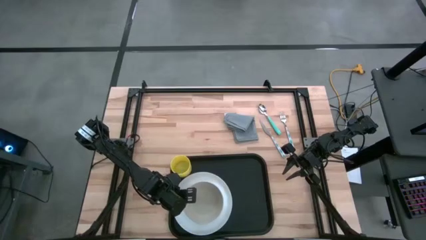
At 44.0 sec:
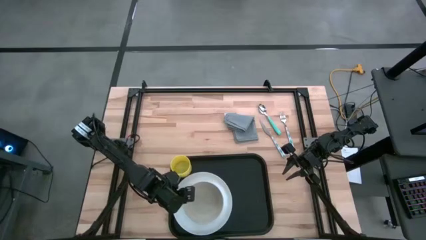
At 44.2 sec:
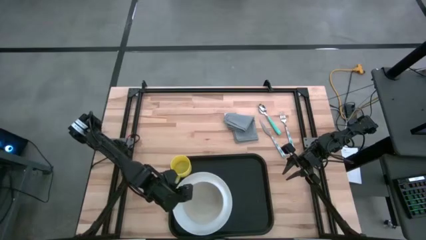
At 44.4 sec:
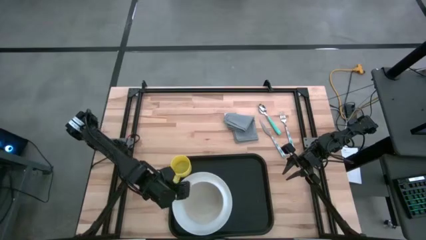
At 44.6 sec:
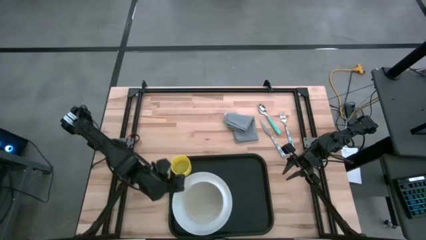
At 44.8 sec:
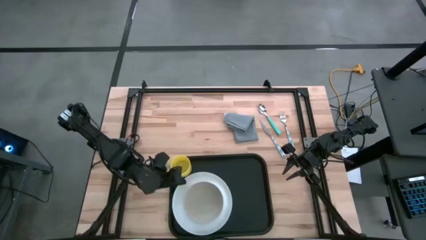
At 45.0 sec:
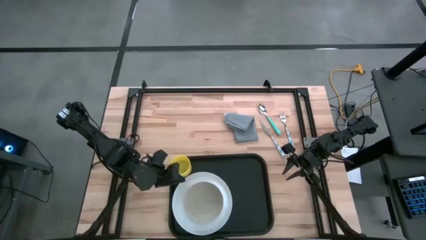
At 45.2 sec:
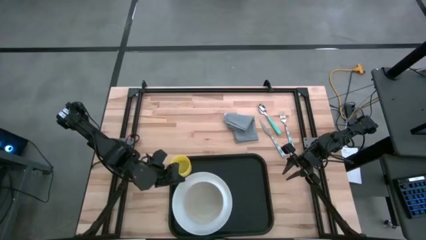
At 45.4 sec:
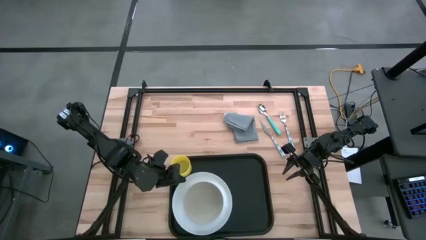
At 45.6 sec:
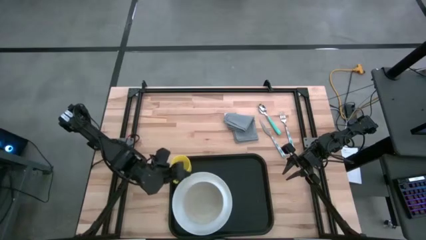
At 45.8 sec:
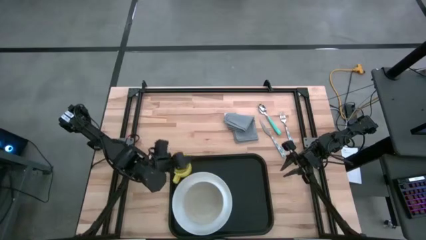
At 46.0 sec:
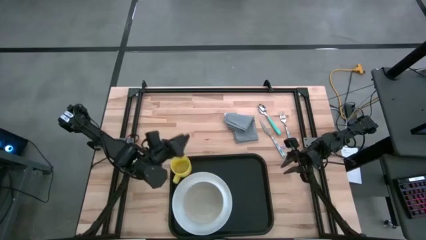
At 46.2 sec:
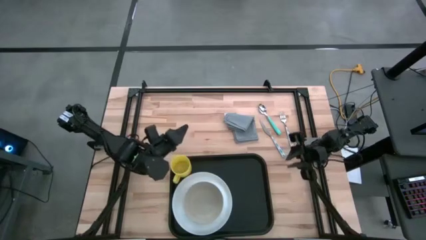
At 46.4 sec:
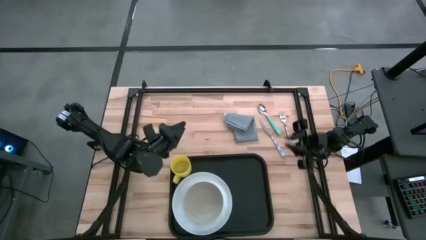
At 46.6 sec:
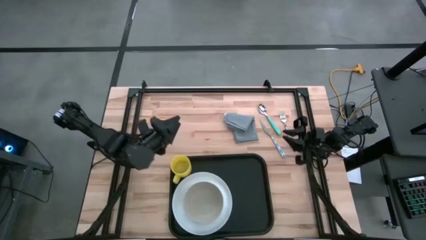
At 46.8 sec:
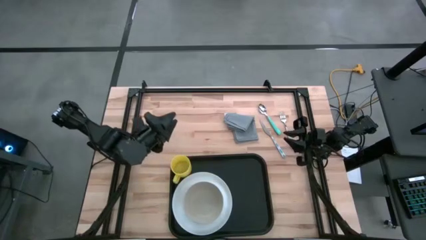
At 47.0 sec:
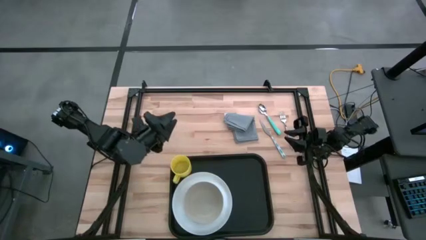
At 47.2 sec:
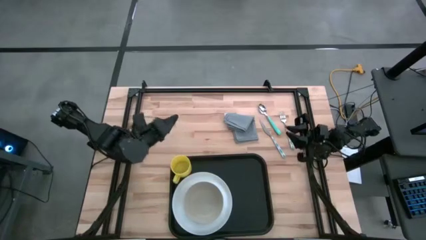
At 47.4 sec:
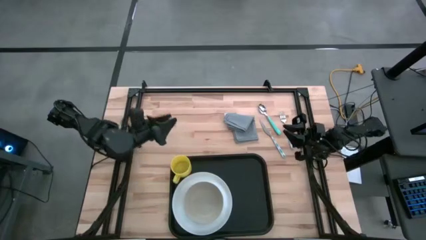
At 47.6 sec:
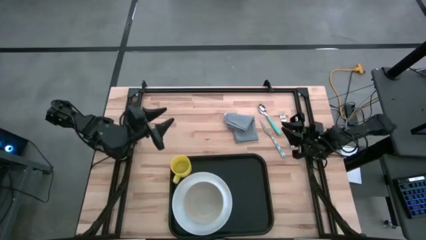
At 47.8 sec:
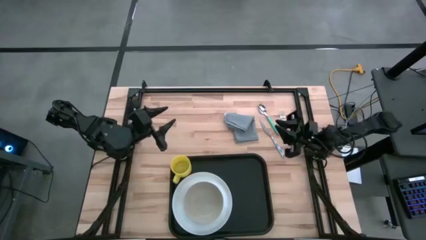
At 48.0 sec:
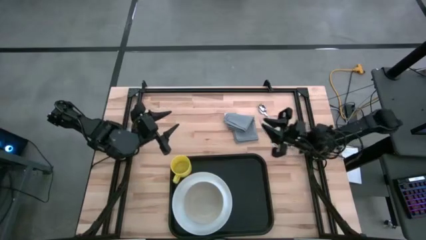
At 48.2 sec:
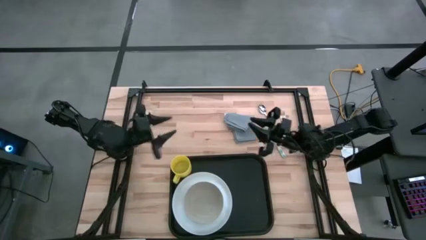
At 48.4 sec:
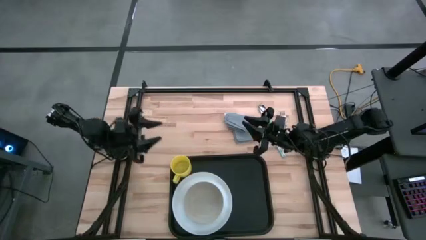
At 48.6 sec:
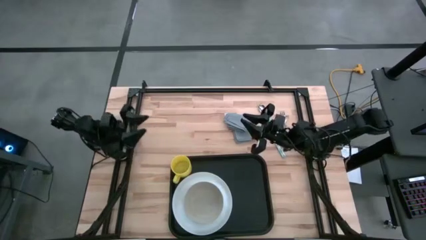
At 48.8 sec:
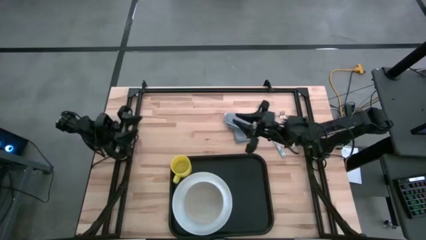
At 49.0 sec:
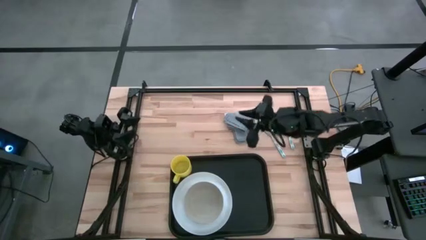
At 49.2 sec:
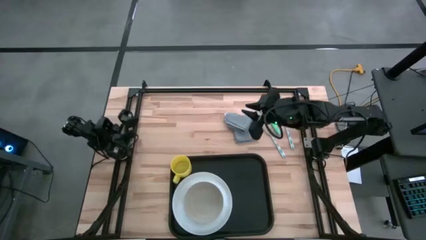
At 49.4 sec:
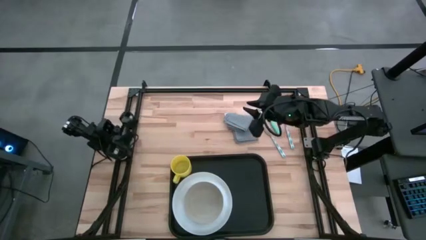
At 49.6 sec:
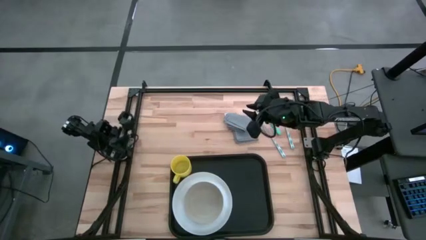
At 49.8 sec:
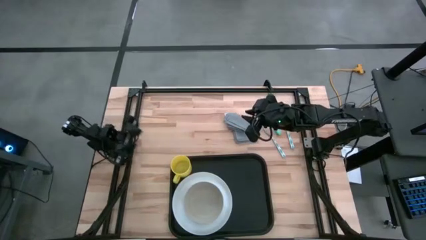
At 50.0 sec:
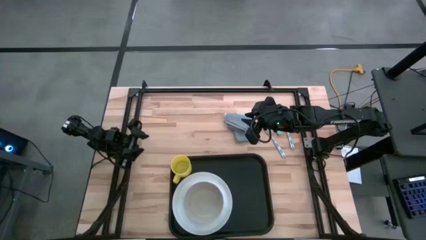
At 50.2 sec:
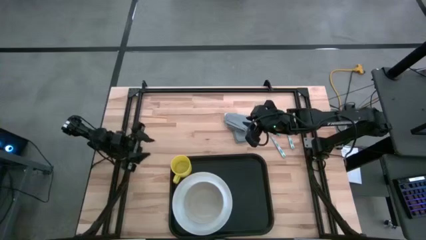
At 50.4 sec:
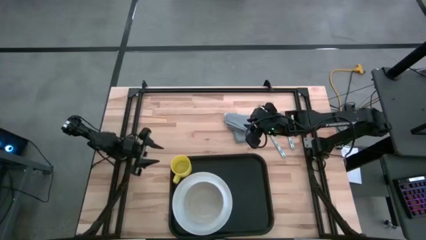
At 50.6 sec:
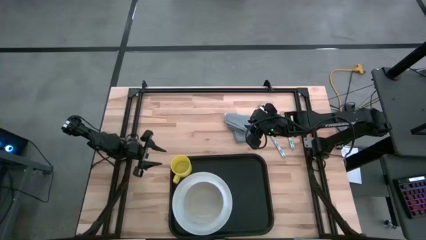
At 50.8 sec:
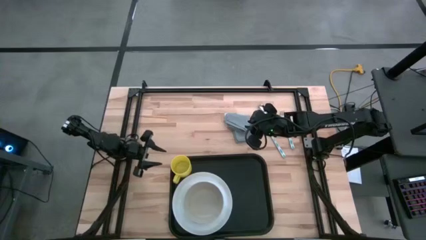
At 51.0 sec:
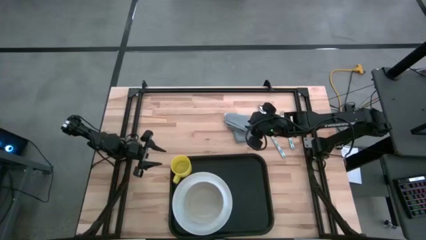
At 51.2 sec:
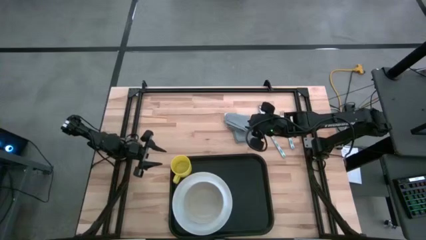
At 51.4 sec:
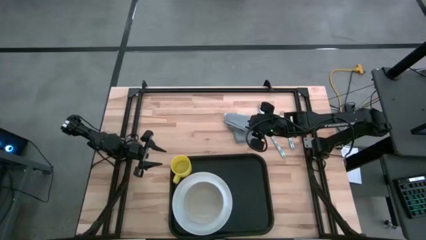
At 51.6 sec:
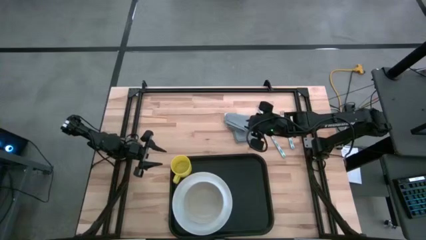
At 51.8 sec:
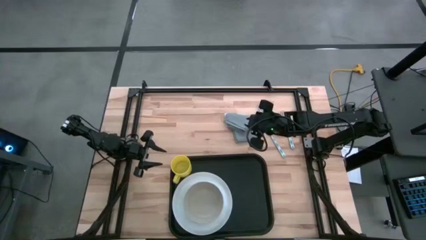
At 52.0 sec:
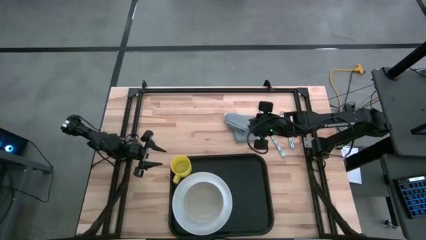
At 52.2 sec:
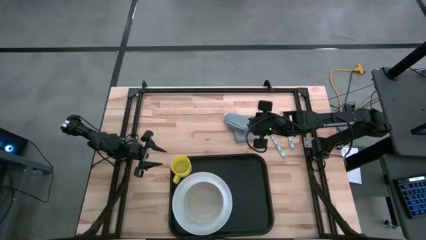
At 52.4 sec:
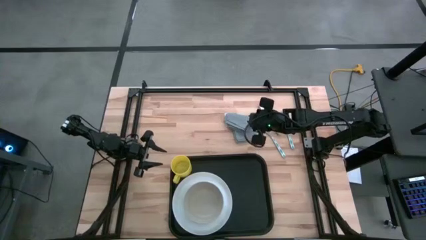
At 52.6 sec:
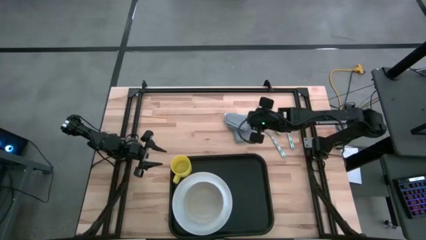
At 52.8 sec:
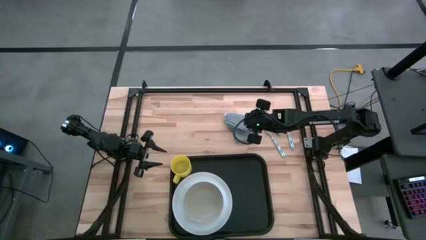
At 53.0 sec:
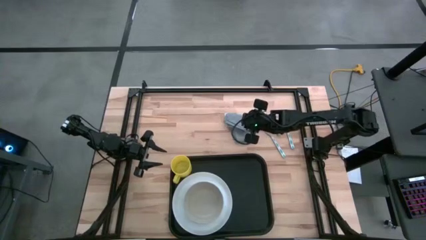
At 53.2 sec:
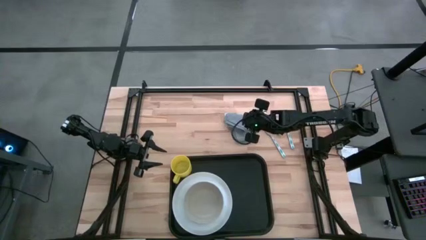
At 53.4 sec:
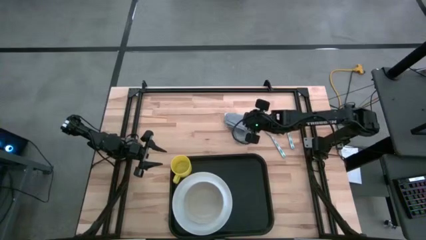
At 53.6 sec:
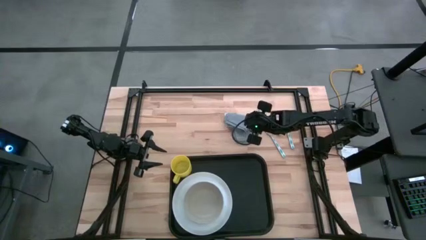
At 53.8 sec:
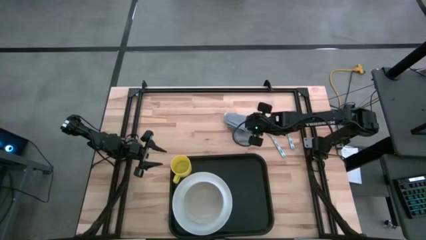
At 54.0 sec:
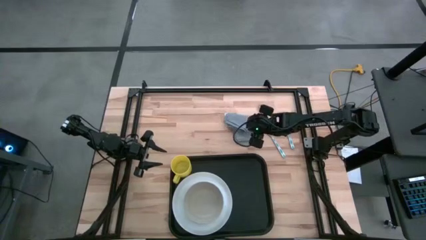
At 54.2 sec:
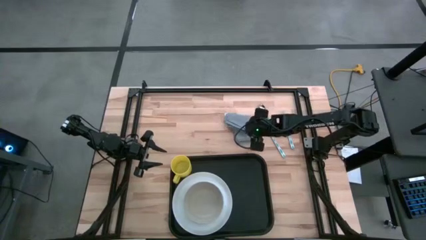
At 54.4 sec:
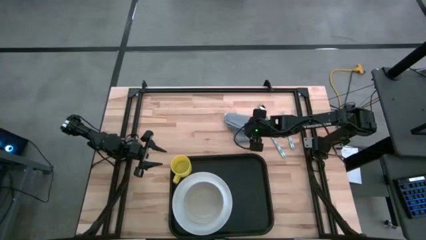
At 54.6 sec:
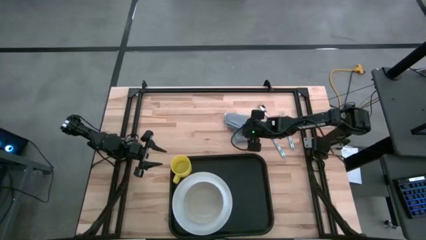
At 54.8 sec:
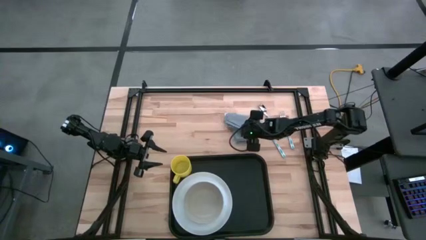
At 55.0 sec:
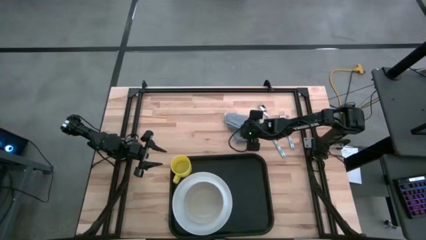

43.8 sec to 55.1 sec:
Task: Set up tray
Put the gray napkin to the right of the white plate on the black serving tray

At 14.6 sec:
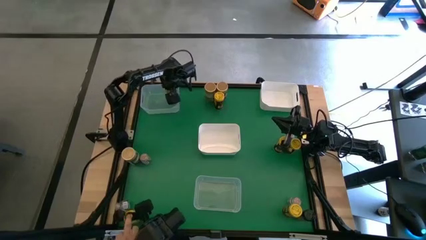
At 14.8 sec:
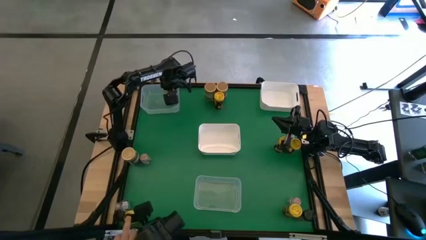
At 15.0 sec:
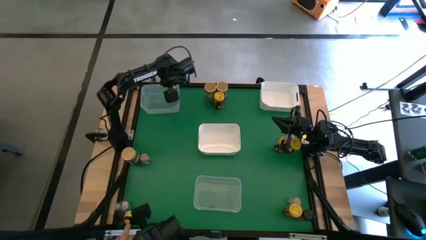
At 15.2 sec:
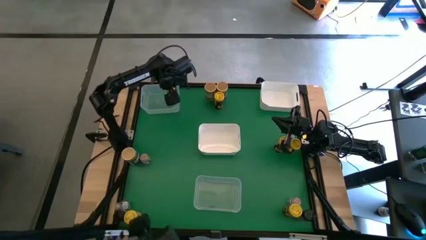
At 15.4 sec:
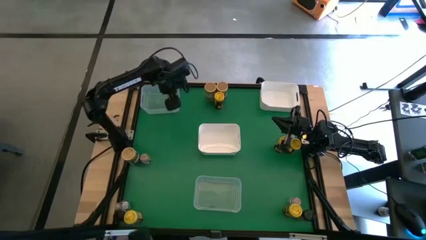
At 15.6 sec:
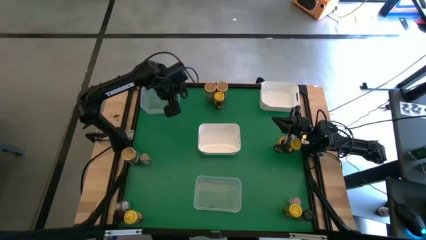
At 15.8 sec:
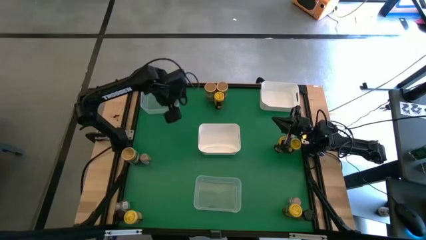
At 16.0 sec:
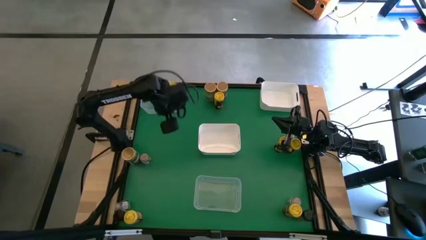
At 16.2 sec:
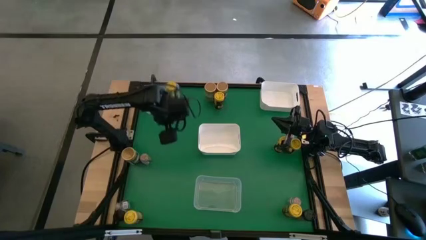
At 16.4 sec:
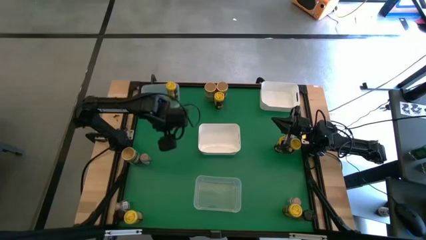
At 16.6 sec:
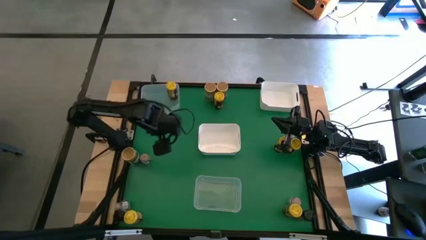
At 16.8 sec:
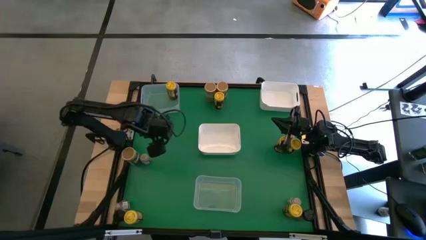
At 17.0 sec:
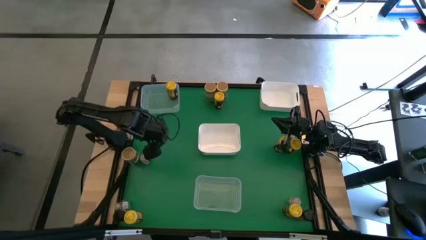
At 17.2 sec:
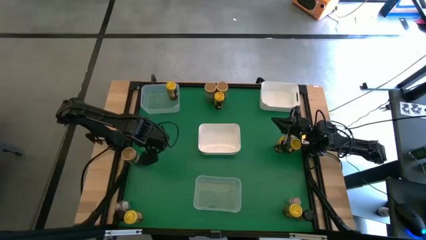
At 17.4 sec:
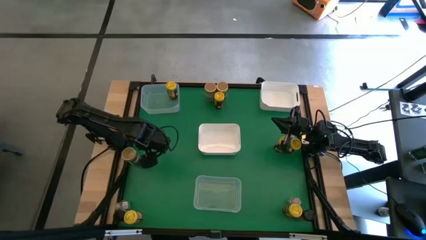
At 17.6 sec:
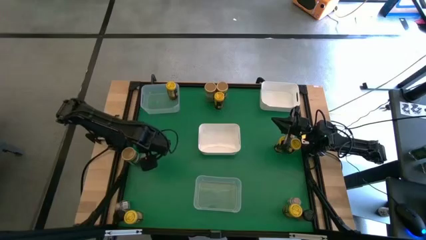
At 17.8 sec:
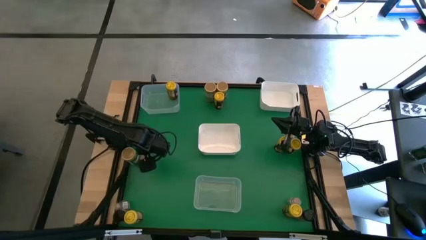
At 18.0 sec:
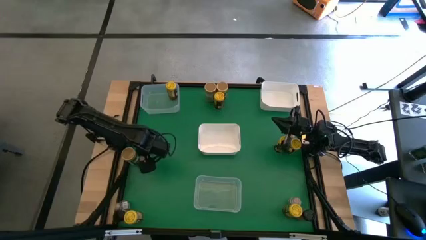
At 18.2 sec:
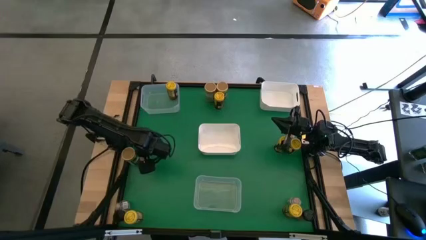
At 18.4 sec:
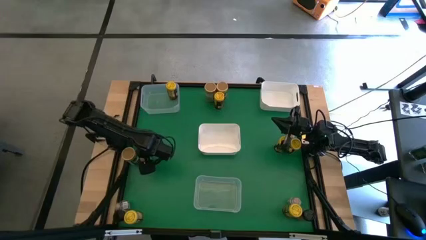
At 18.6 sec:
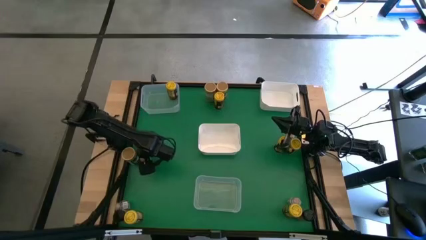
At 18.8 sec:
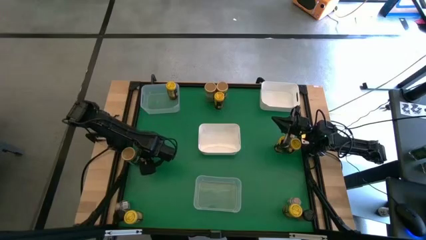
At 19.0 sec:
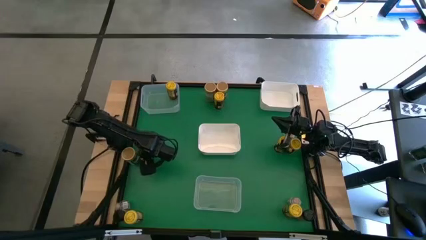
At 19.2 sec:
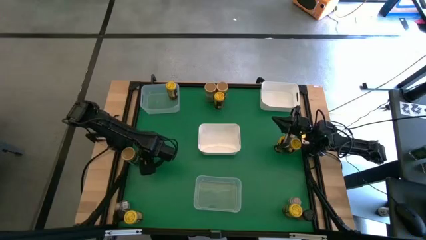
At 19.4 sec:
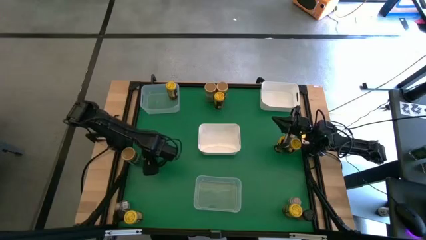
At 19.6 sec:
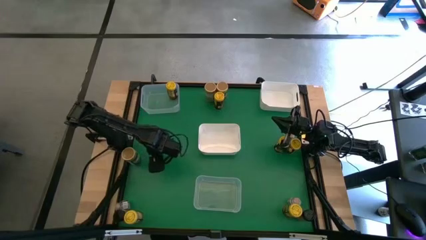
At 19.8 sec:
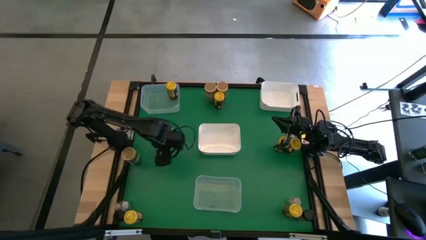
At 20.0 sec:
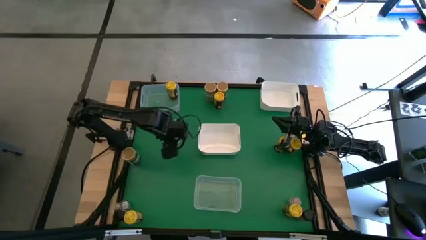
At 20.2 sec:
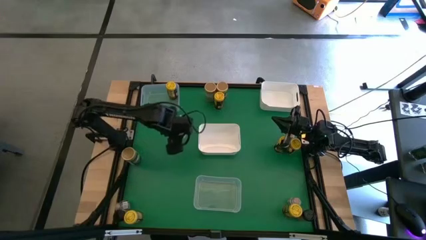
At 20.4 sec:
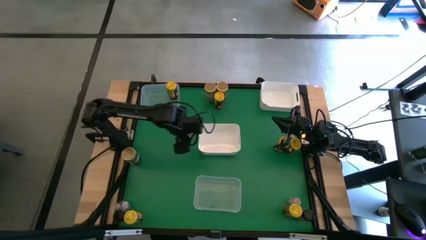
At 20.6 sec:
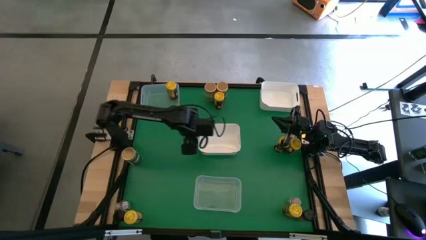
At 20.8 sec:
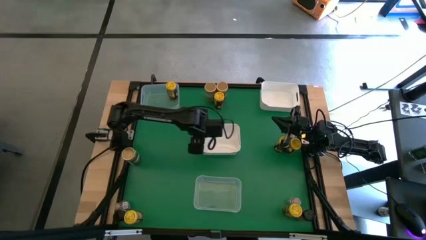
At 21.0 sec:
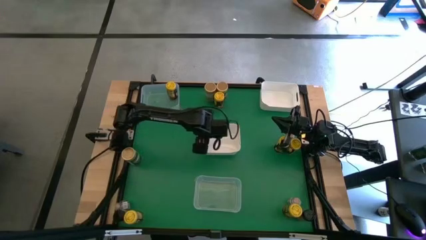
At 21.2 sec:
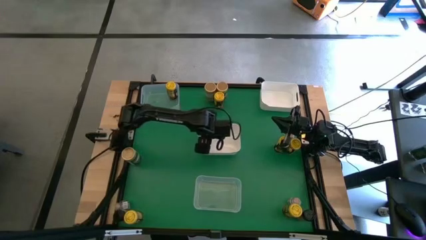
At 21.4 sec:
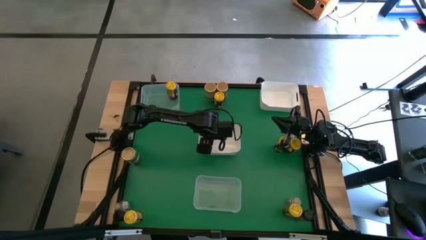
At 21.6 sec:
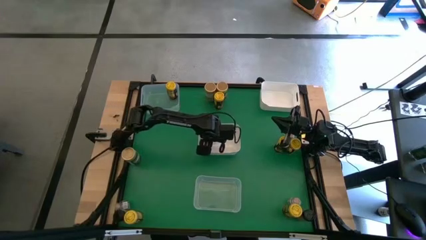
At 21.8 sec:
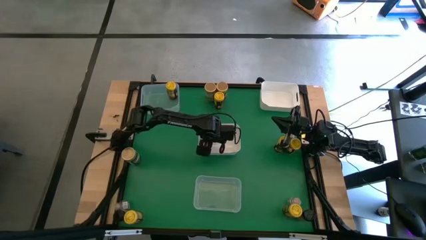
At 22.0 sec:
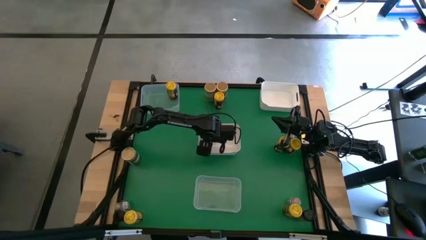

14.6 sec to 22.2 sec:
Task: Sort spices by type
Put the top left brown seasoning bottle into the bottom white bin
